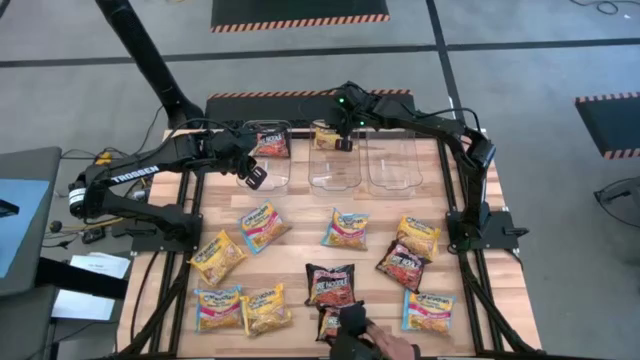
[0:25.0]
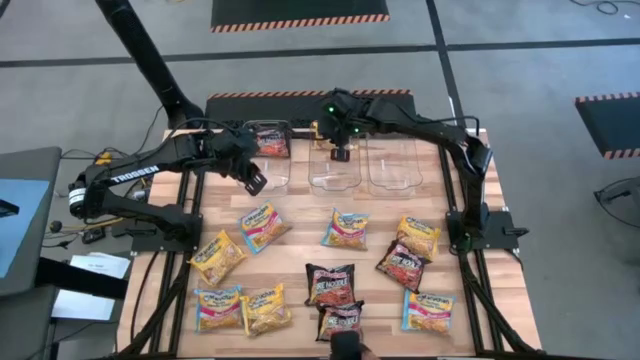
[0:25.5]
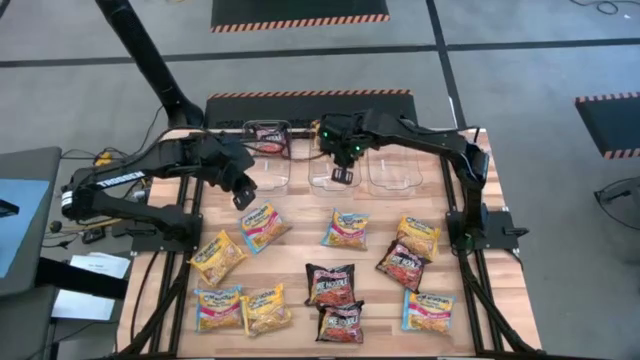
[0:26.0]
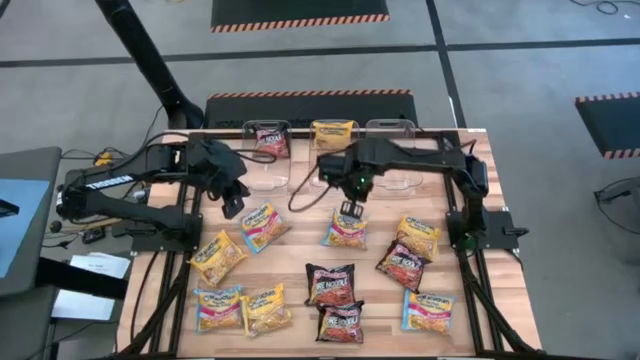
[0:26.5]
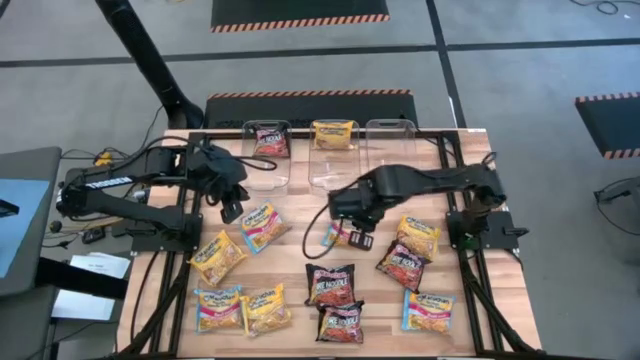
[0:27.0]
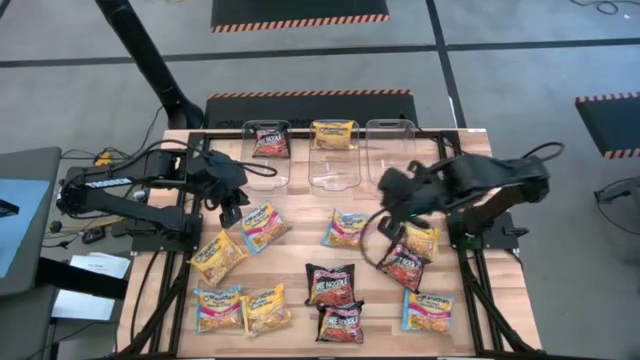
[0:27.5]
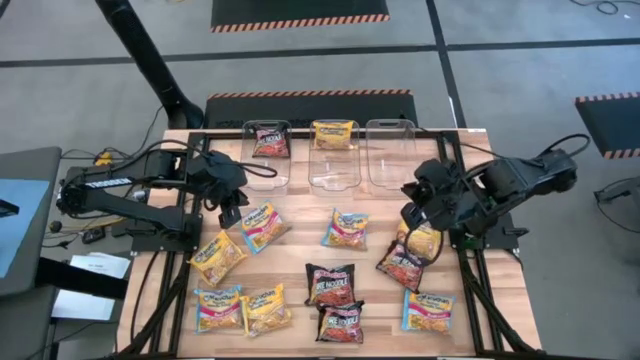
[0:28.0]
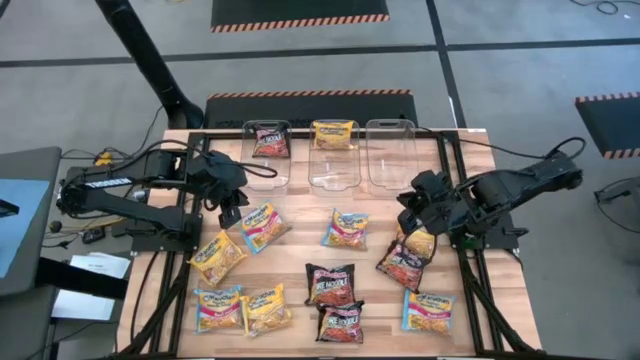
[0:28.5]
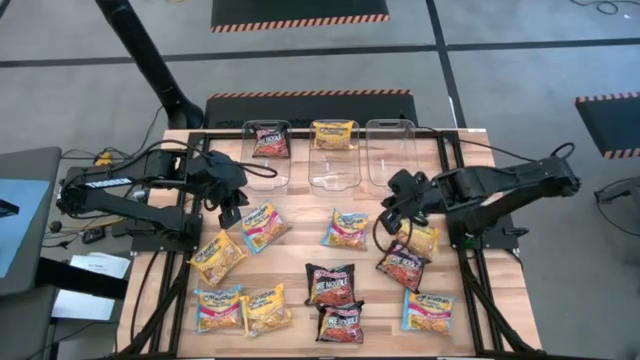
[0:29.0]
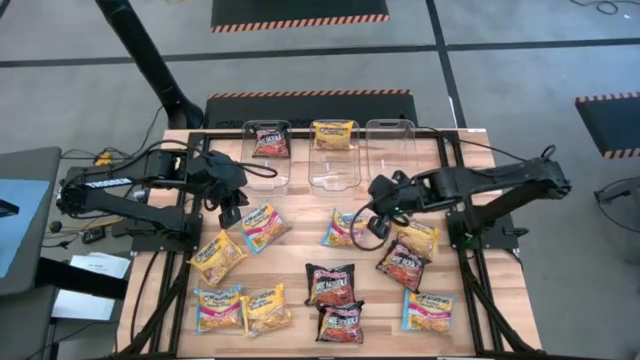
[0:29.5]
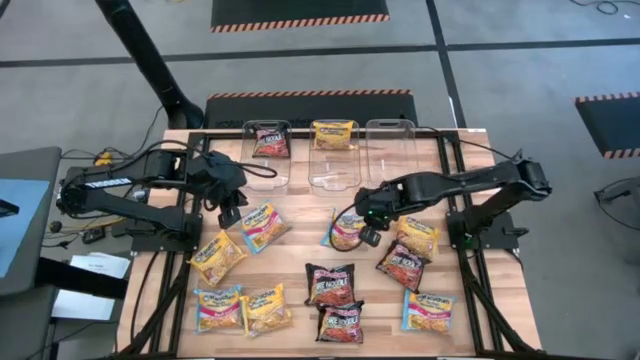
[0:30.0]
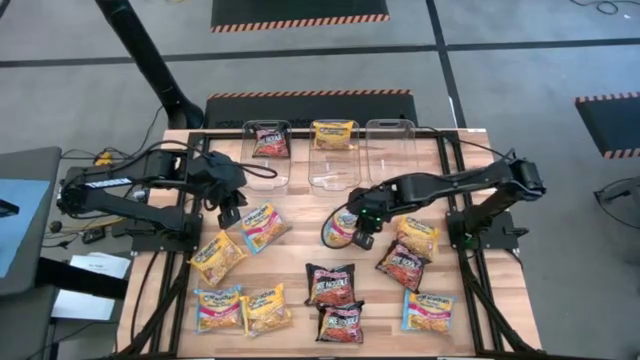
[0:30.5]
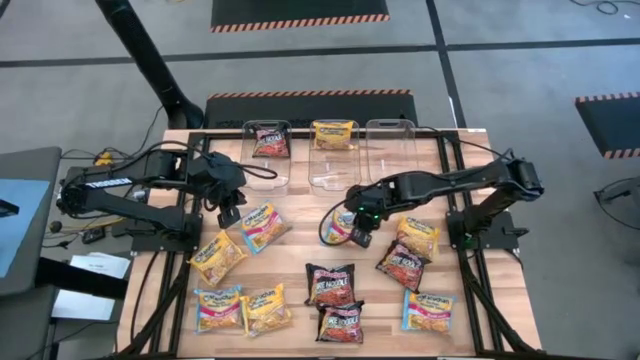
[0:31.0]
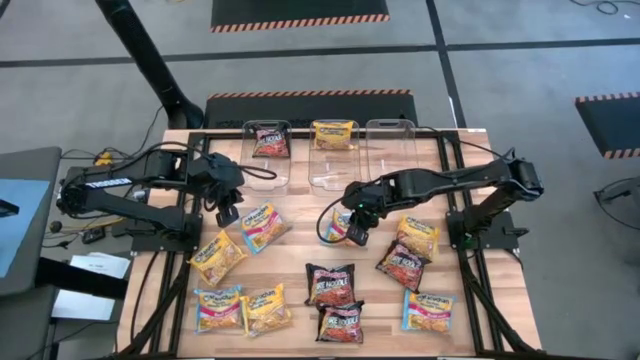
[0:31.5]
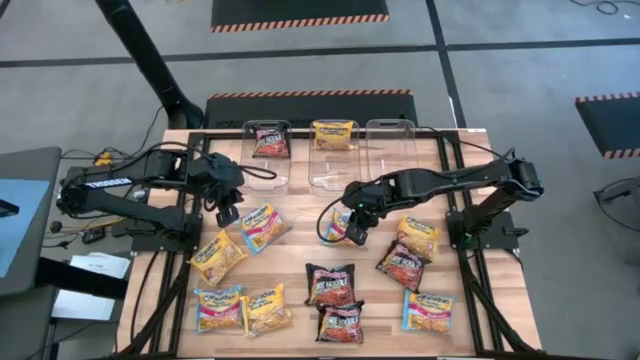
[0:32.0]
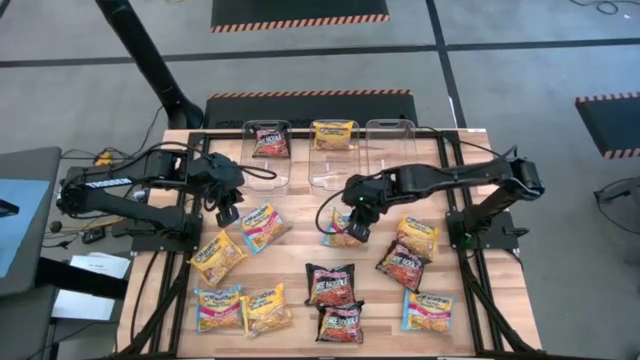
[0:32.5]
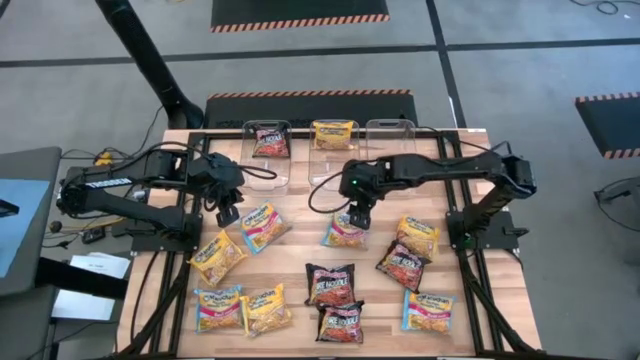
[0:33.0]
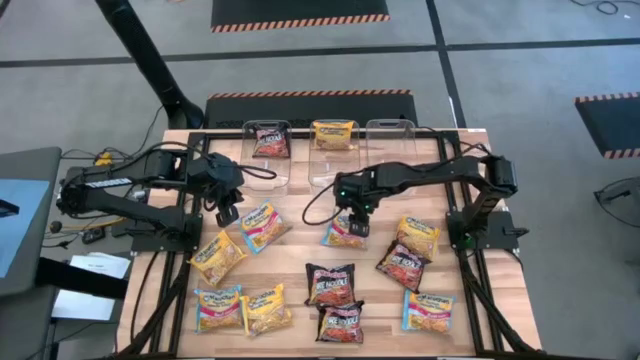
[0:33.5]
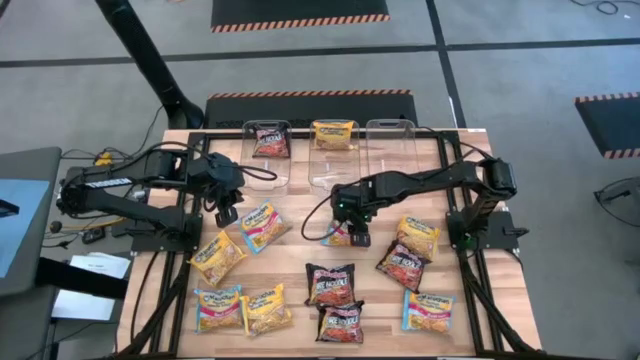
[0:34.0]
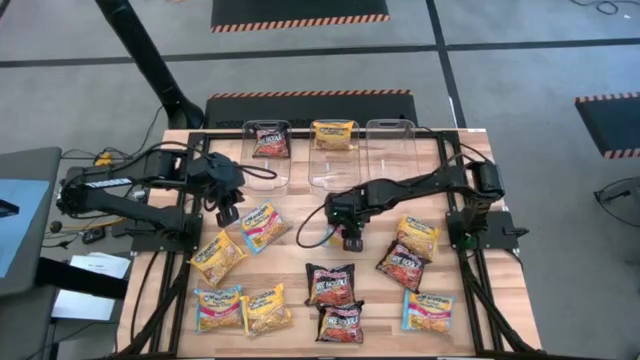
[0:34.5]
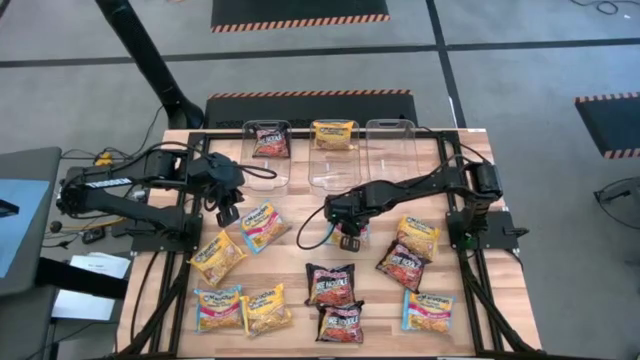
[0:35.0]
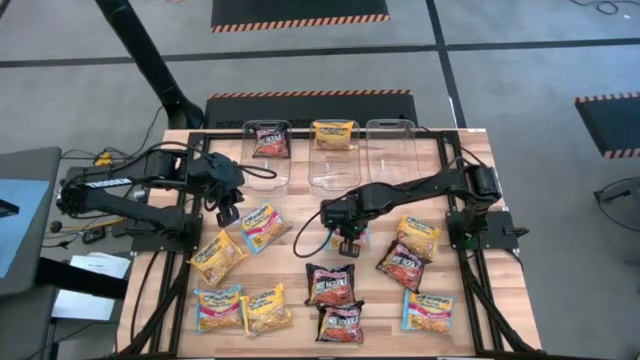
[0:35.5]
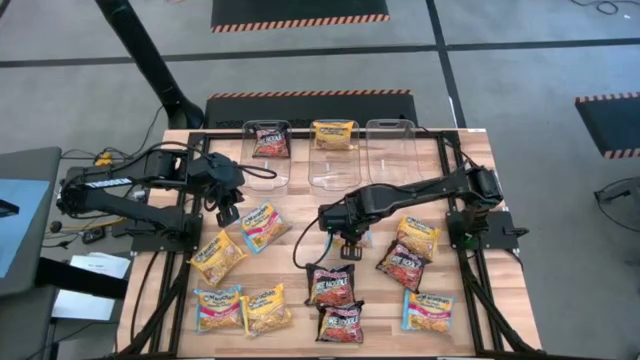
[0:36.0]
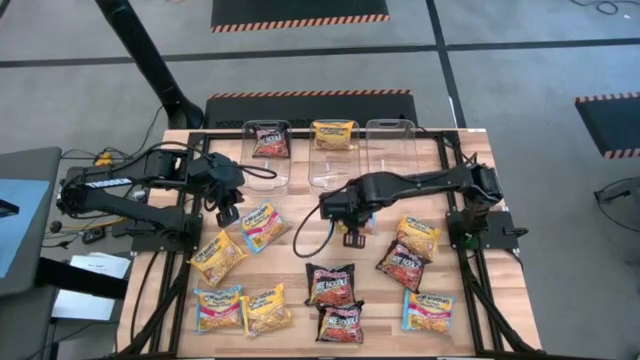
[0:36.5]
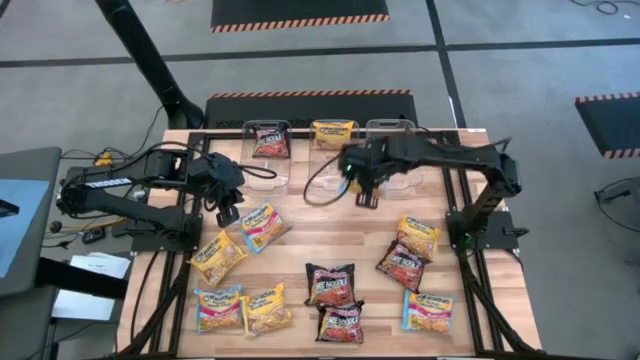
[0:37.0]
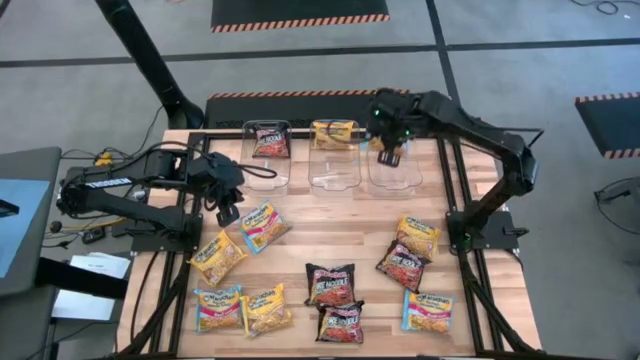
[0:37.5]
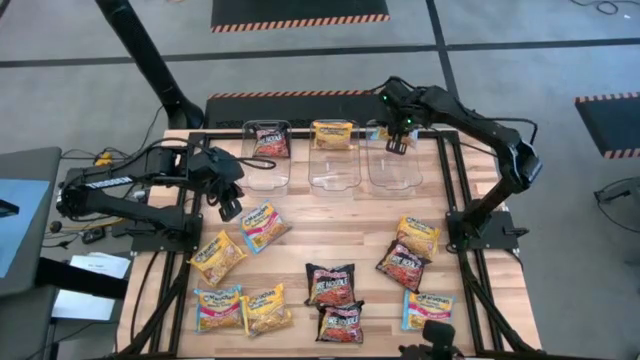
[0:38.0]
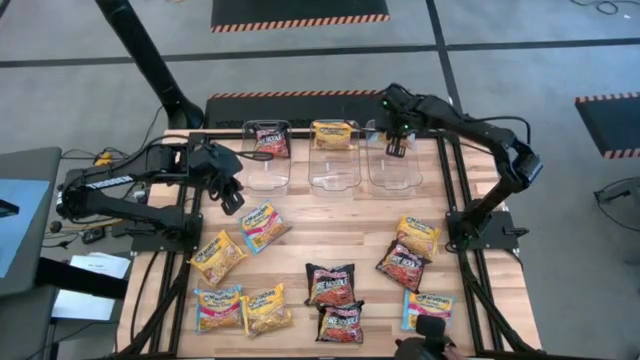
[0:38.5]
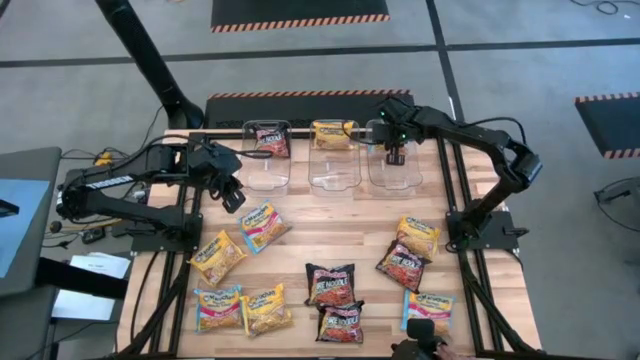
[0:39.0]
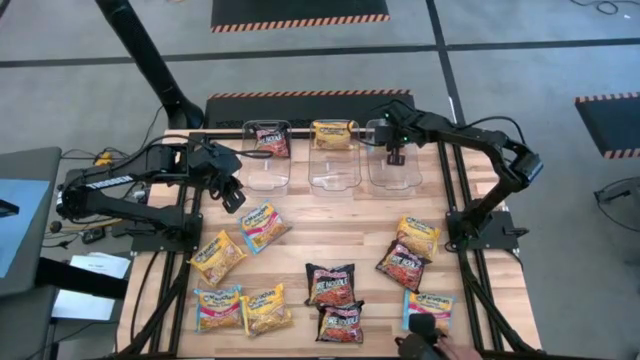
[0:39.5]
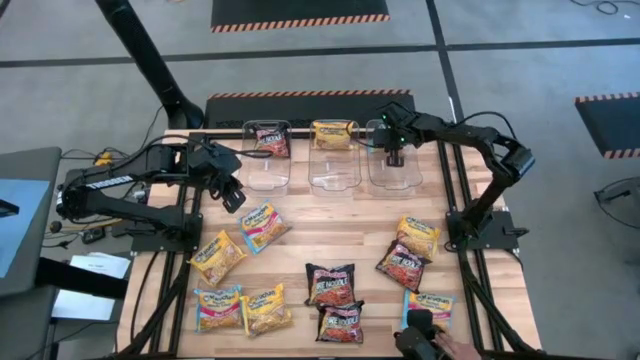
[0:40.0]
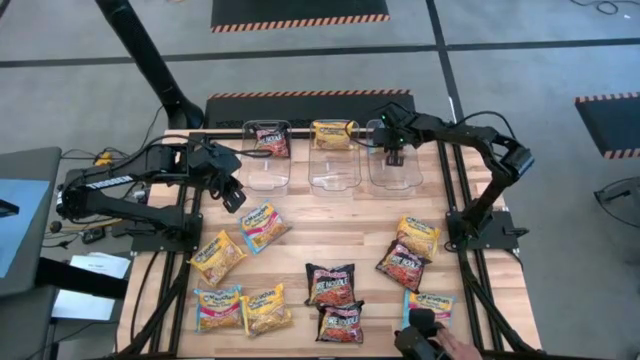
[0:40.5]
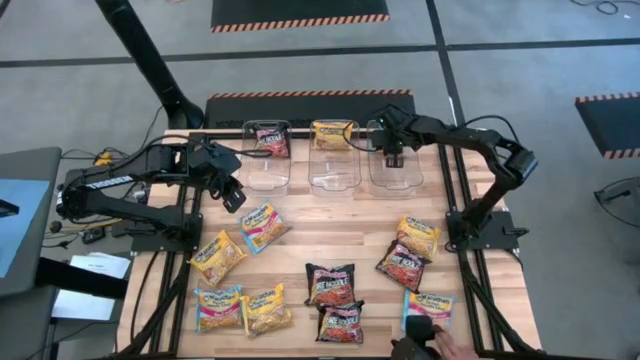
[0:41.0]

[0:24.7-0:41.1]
Task: Sort Maruchan noodles
Put the blue noodle pack into the right transparent bin

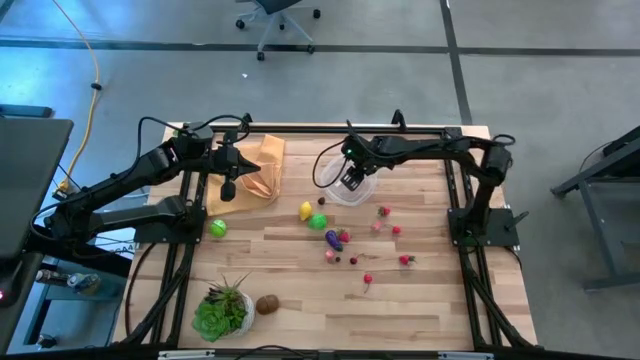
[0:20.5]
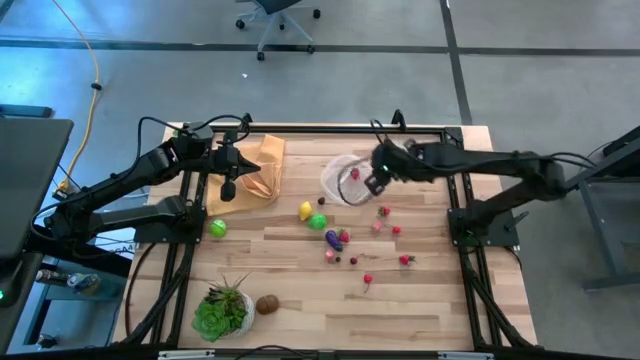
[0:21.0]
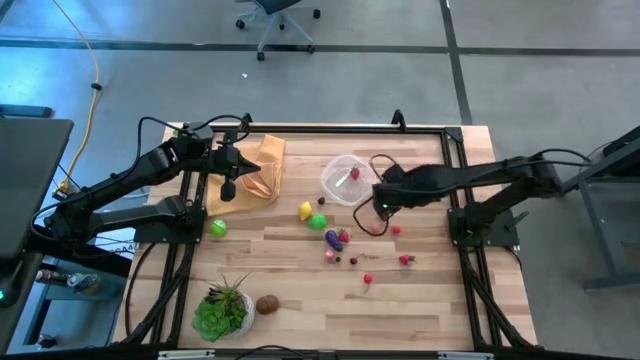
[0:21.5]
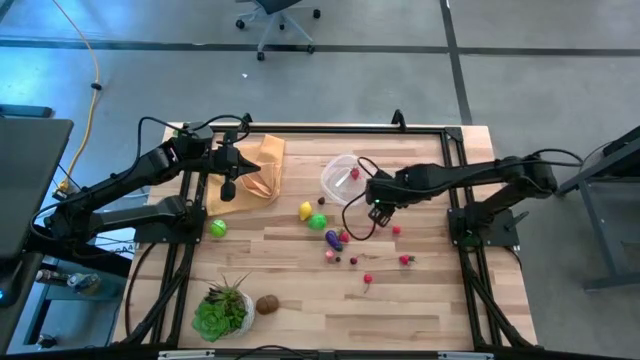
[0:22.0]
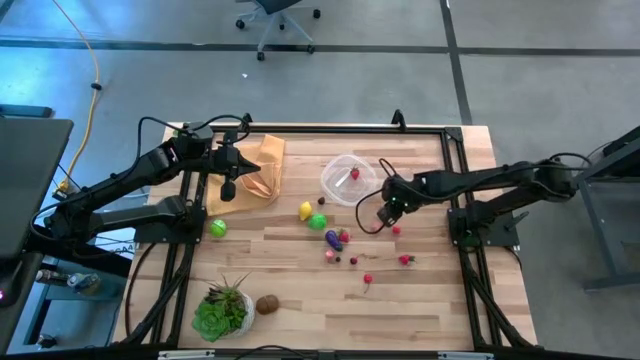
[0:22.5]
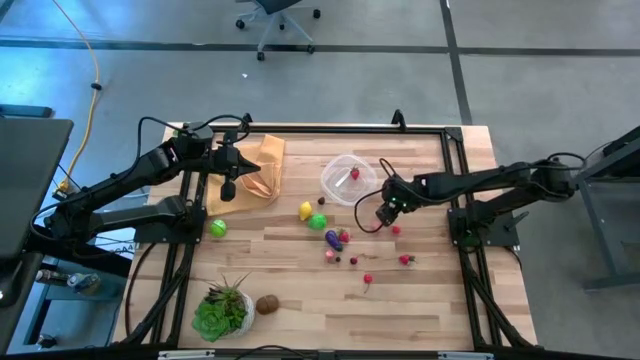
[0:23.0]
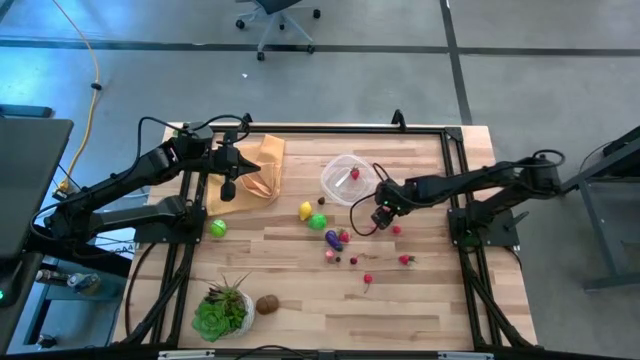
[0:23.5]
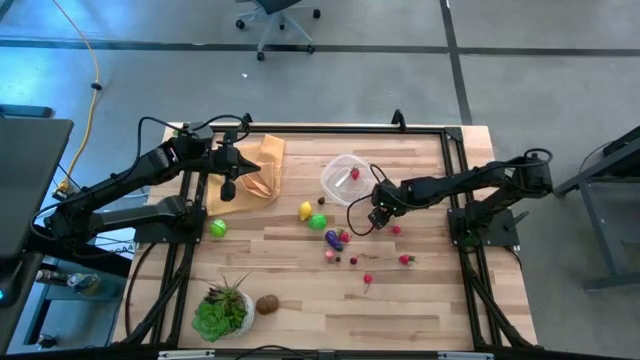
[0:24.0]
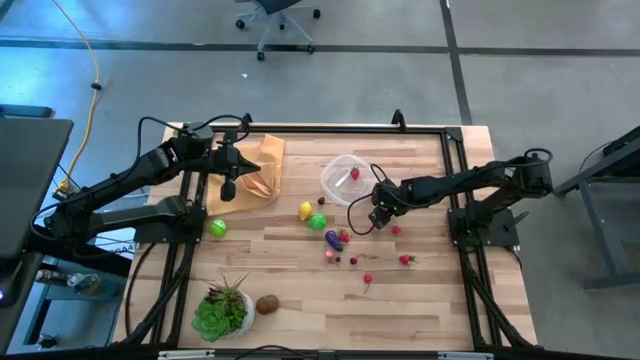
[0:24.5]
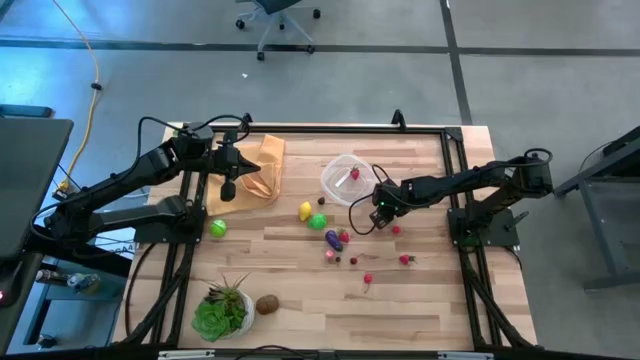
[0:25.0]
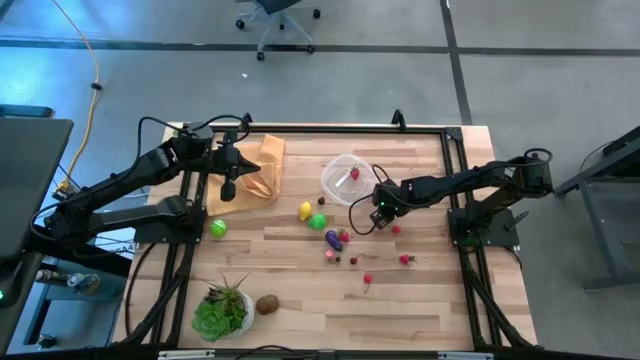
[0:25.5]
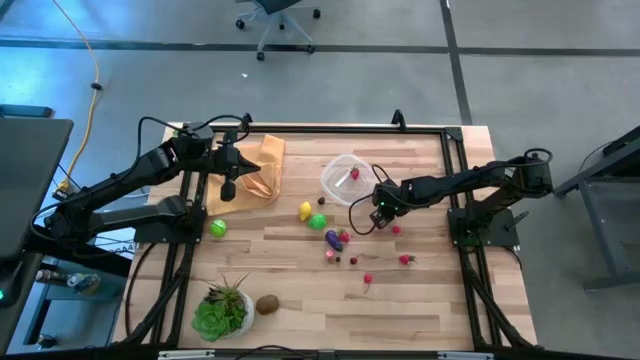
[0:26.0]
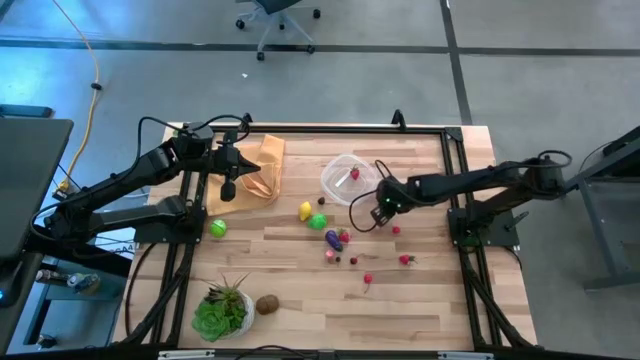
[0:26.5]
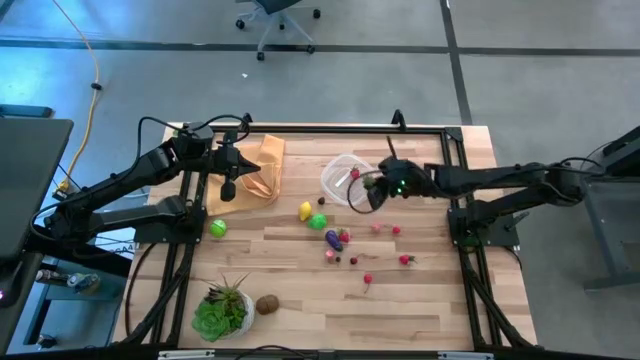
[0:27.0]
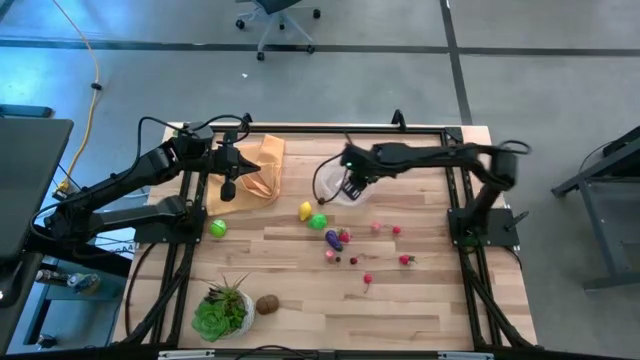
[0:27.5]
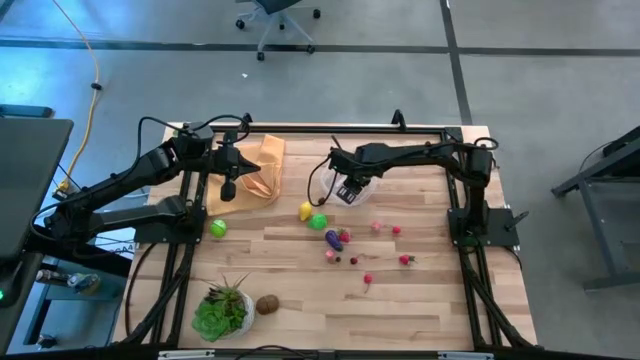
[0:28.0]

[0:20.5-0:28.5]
Task: Pick and placing Produce into tupperware
Put the red strawberry into the transparent container
